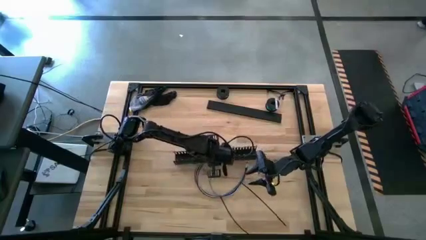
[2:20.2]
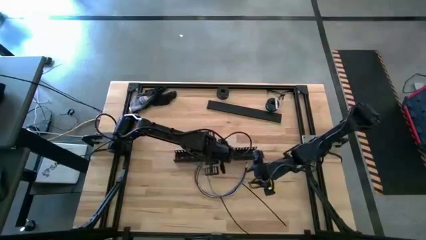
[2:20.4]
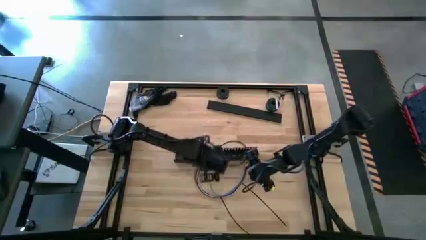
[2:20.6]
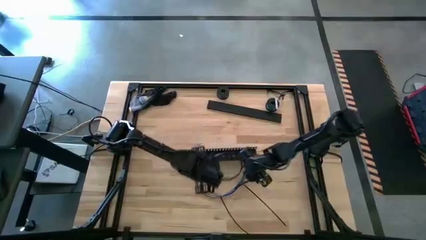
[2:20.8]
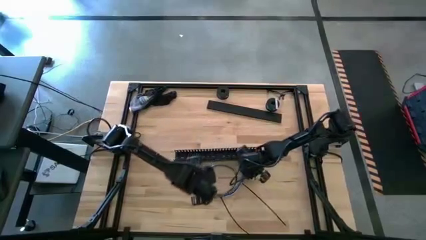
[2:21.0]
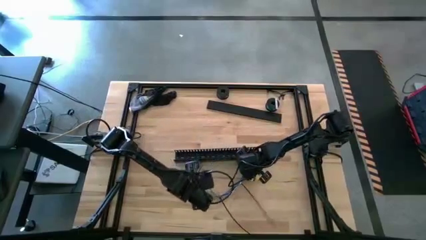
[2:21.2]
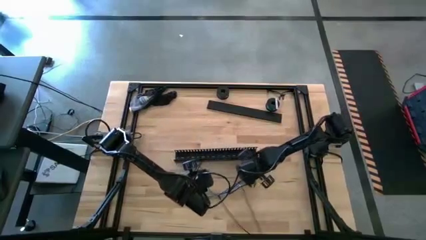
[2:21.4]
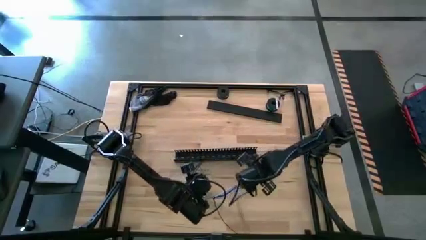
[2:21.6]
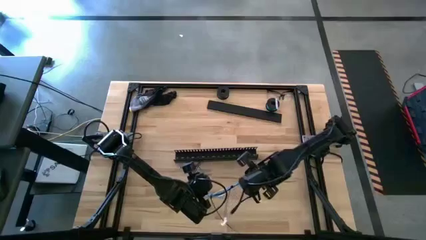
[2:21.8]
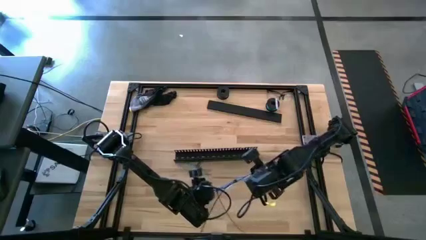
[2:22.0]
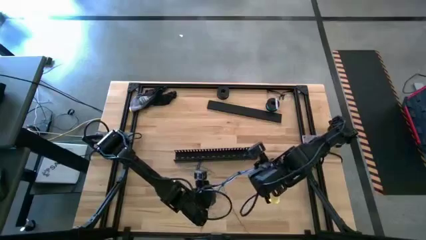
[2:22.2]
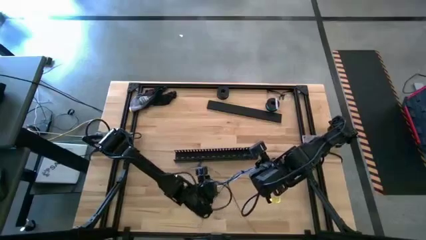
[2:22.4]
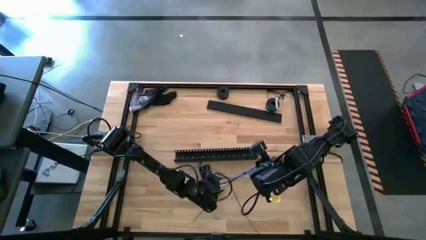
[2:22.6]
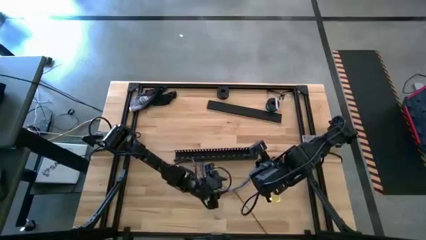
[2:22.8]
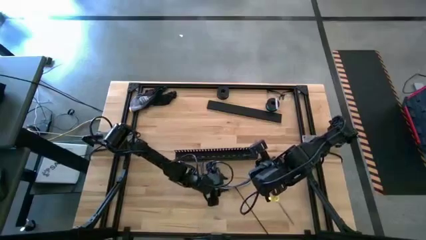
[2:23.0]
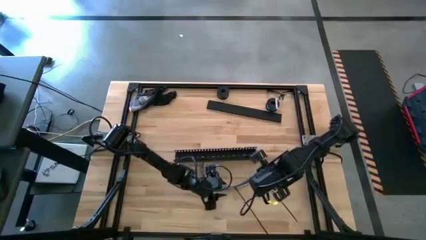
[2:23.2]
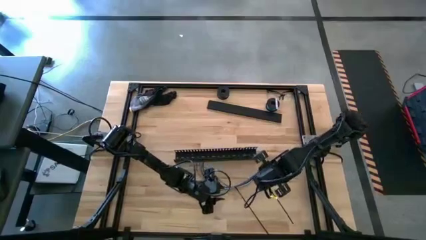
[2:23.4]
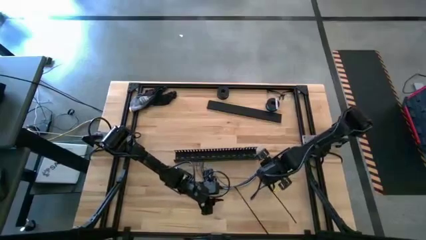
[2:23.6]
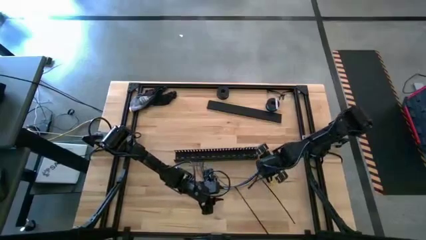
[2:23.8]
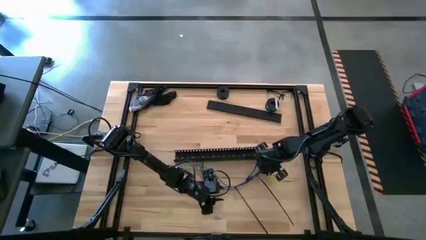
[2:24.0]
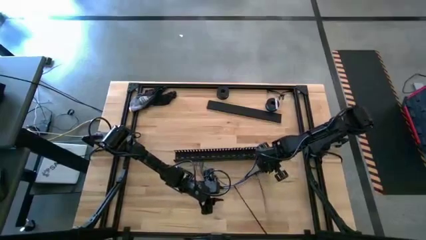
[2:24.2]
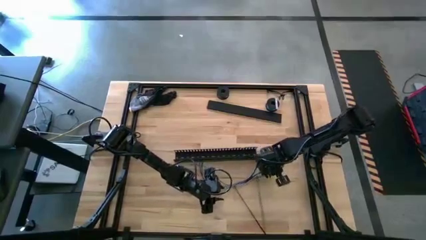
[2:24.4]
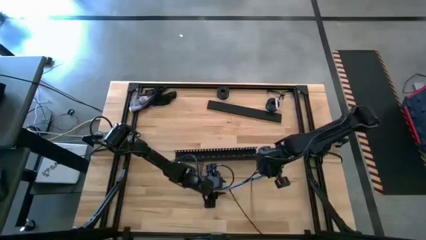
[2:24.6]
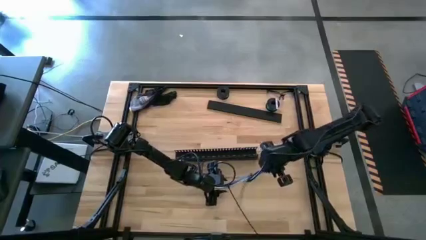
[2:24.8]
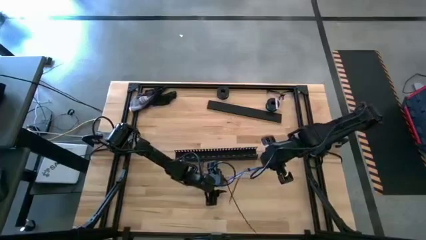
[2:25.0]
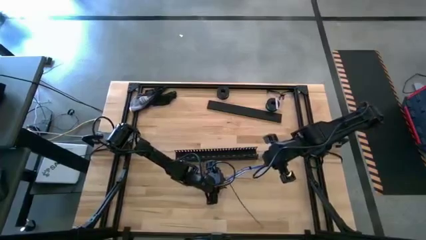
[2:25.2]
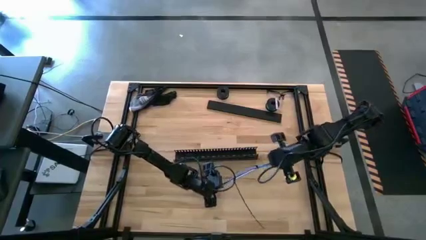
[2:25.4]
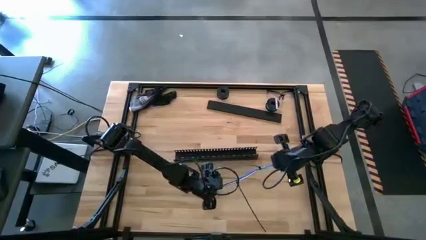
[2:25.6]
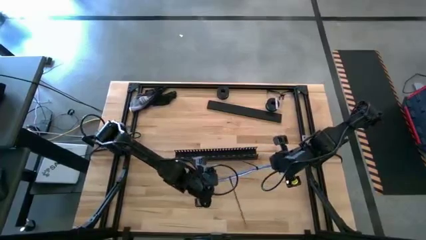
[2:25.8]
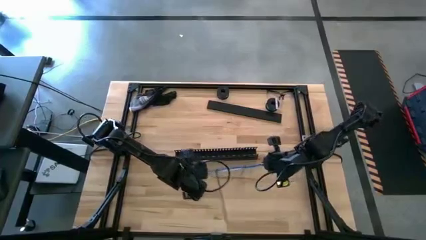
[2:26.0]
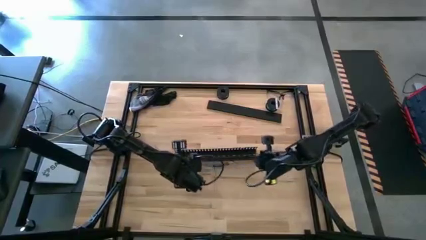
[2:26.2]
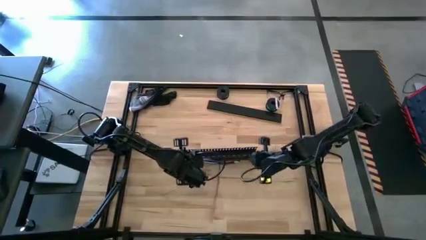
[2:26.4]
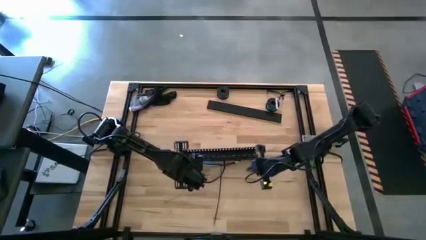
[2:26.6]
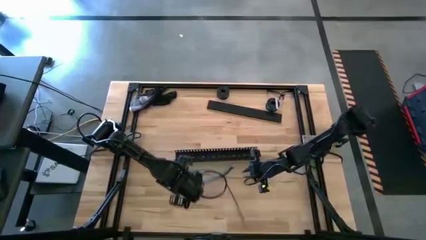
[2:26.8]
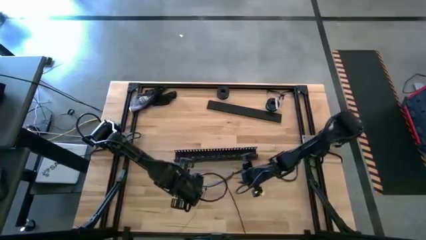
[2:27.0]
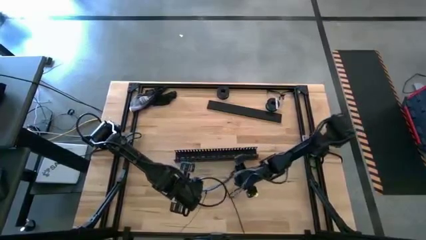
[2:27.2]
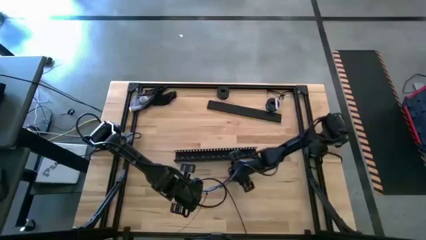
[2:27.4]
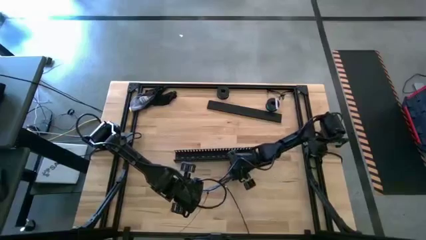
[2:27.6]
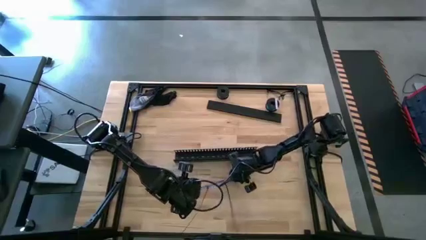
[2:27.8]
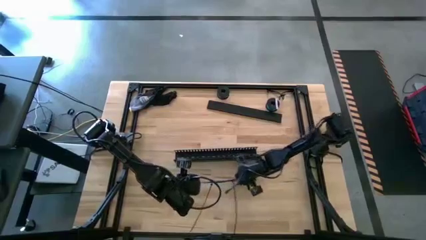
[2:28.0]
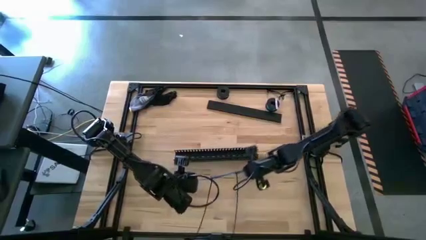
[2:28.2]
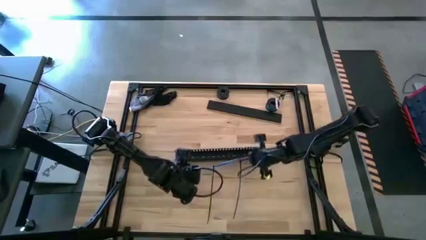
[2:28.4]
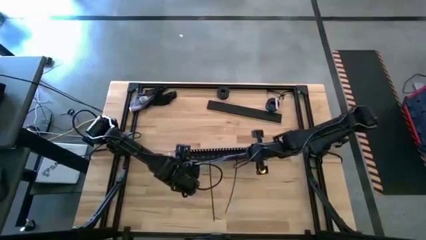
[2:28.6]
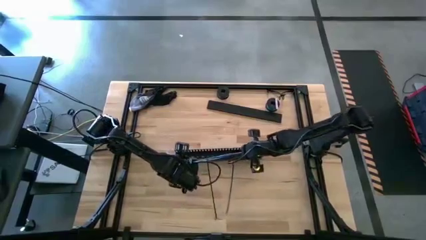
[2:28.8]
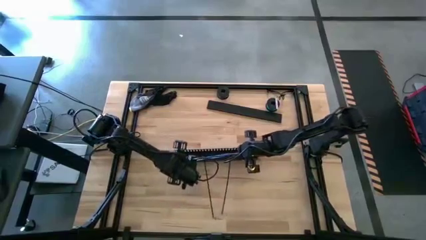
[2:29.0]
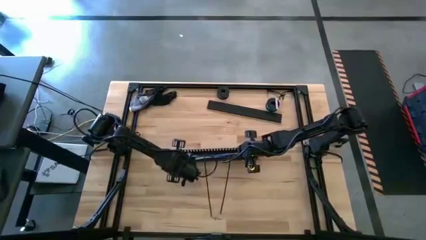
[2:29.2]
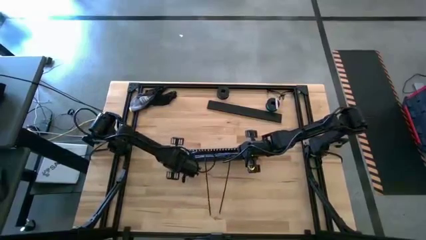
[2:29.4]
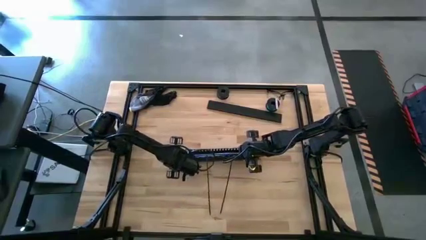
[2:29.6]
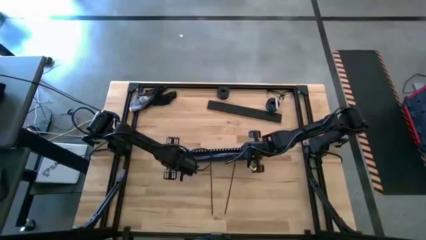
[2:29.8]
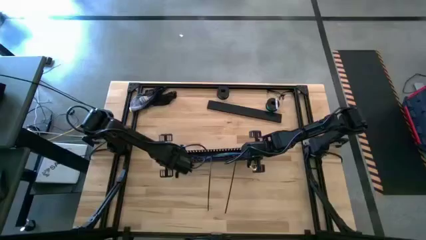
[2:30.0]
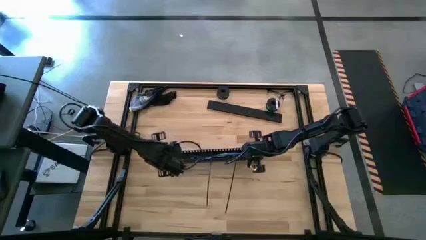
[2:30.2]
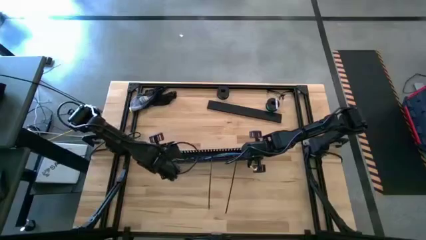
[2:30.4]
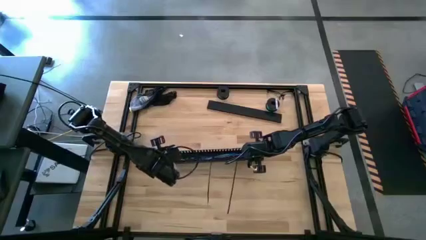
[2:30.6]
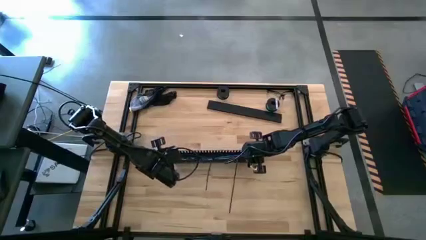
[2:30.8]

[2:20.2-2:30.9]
Task: Ziptie cables
Put the cable wires into the black cable duct

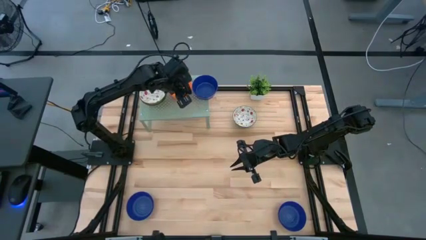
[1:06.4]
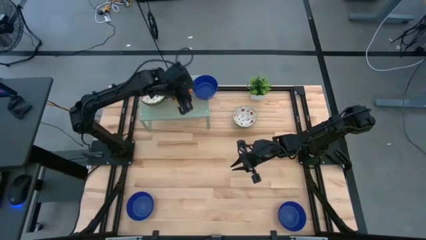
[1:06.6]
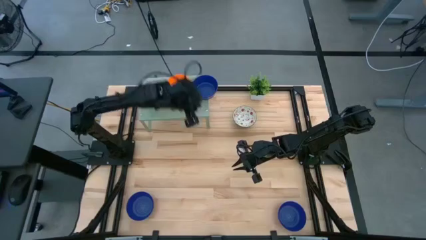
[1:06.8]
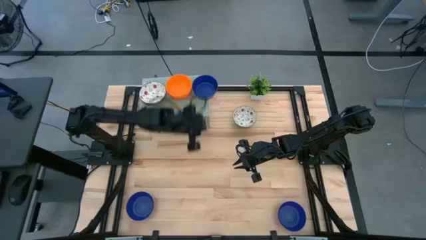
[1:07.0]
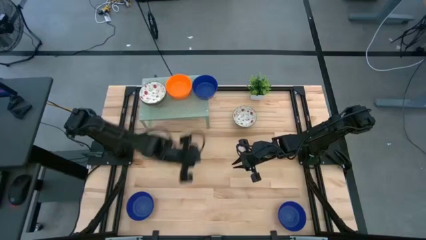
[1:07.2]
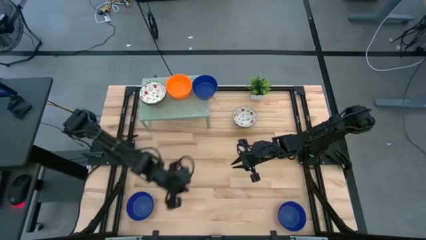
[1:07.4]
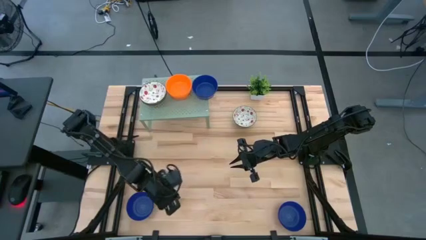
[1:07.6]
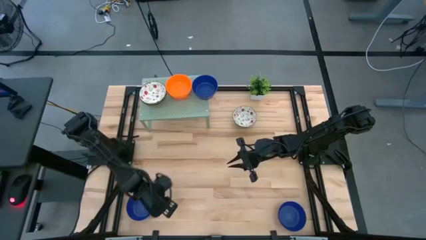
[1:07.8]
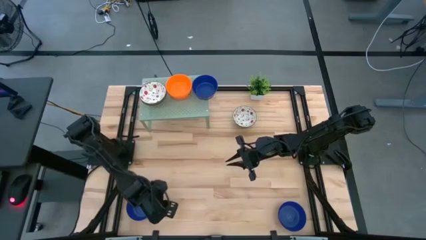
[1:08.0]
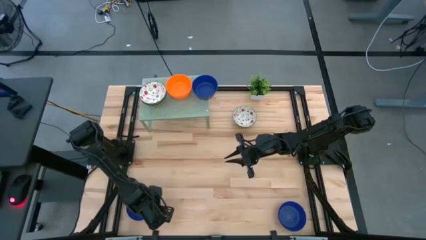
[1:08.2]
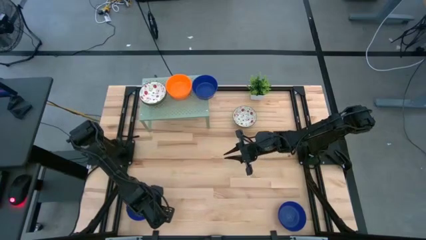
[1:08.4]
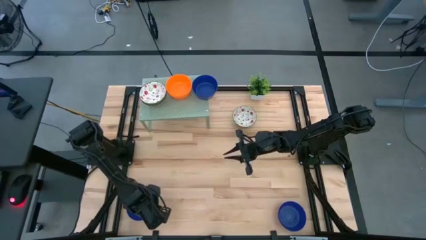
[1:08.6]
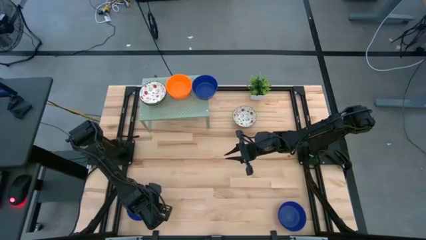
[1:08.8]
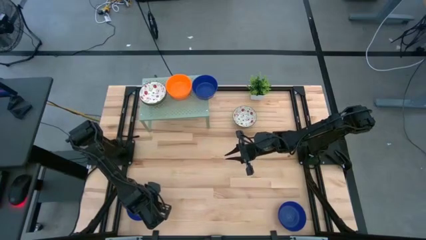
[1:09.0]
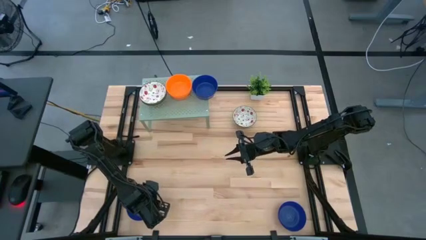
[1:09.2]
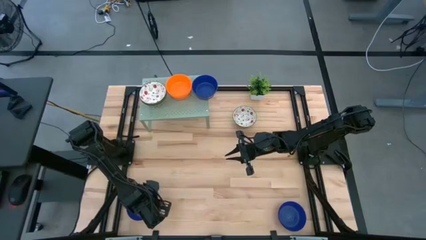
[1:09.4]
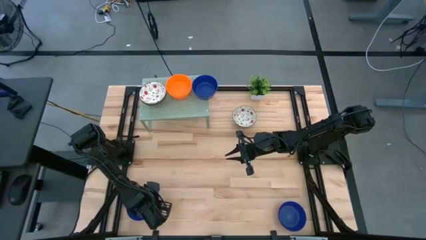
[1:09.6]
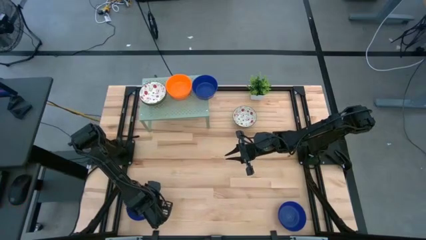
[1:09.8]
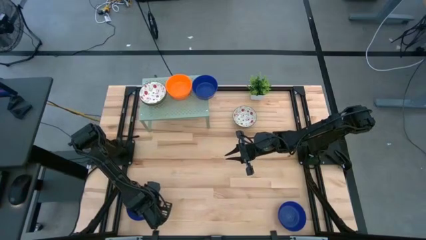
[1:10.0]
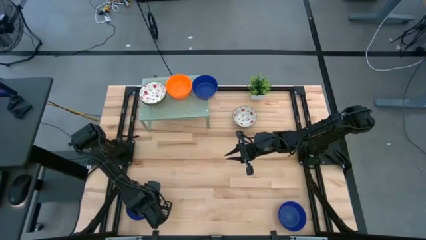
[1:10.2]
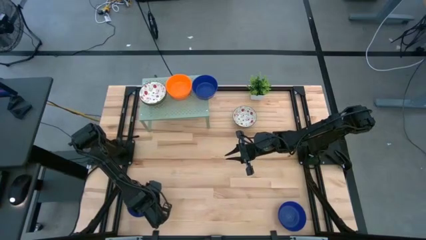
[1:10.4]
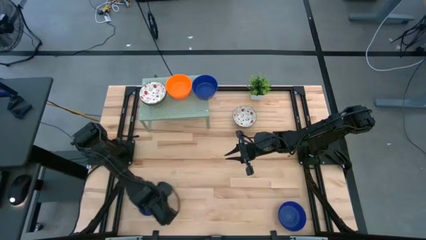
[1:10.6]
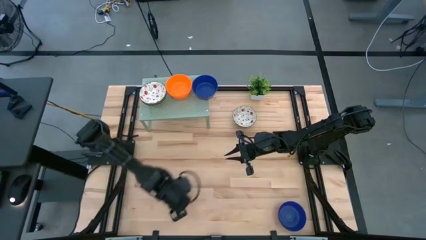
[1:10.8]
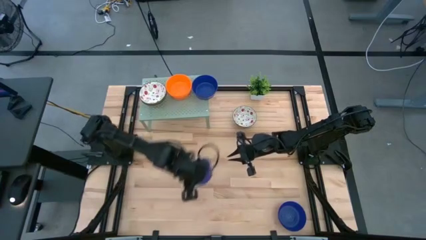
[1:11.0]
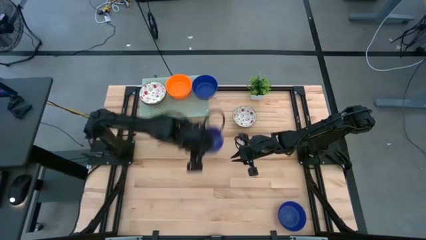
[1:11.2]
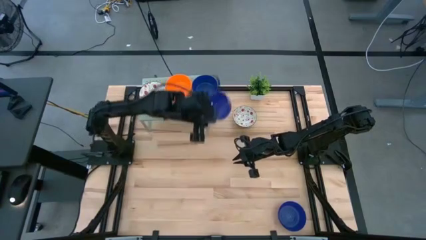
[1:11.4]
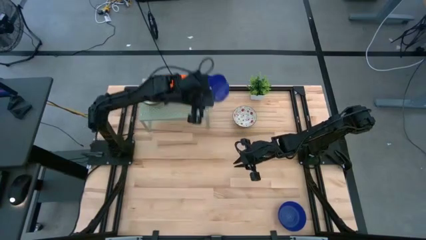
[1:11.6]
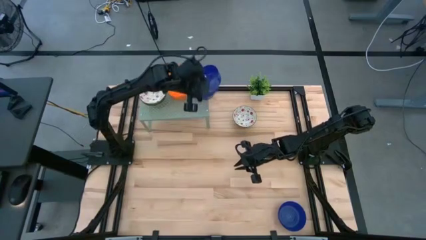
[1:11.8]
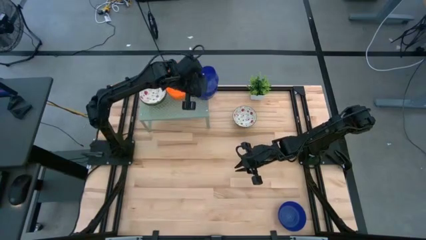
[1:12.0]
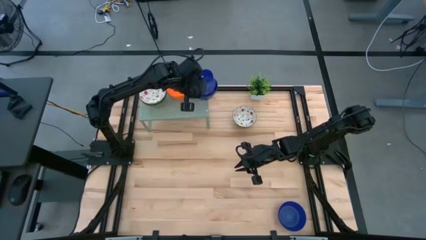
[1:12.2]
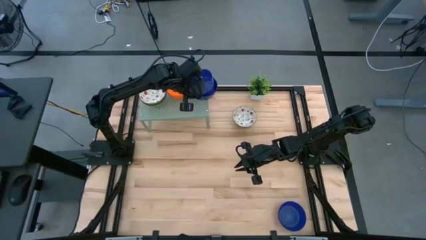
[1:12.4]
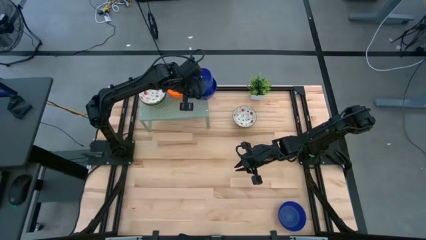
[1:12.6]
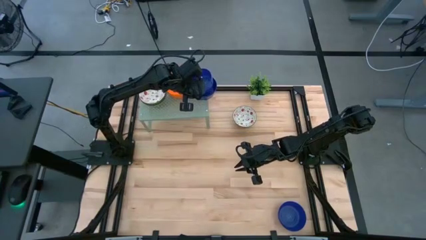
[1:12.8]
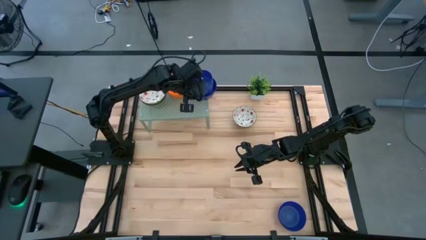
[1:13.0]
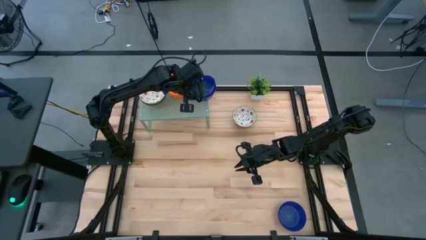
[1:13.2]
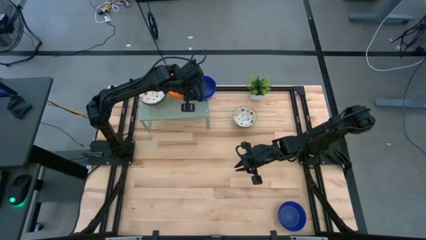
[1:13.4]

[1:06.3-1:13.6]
Task: Pick & Place Mini bowls
Stack the blue bowl on top of the other blue bowls on the shelf
